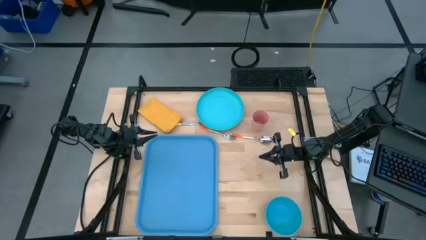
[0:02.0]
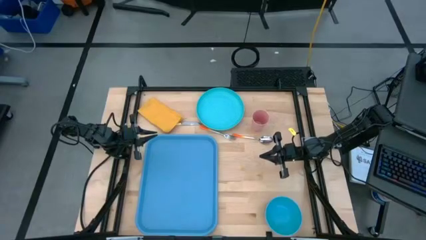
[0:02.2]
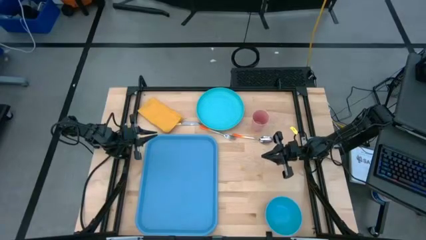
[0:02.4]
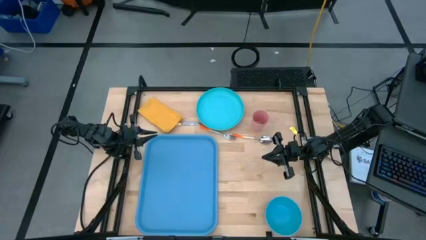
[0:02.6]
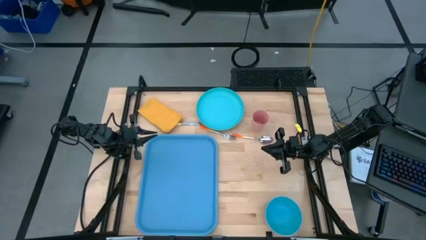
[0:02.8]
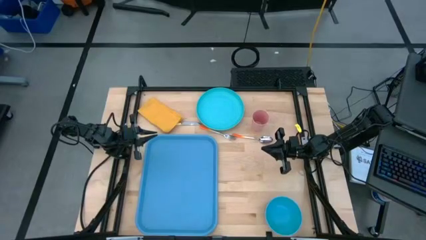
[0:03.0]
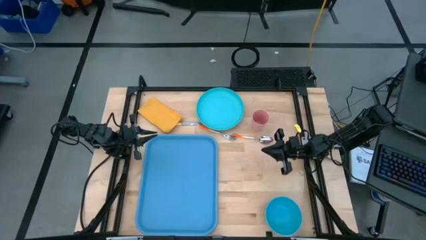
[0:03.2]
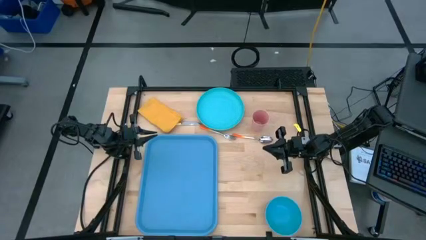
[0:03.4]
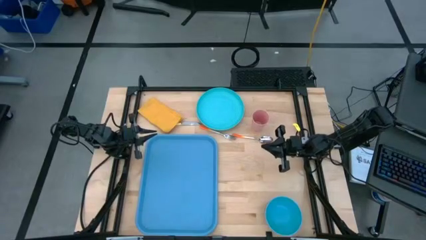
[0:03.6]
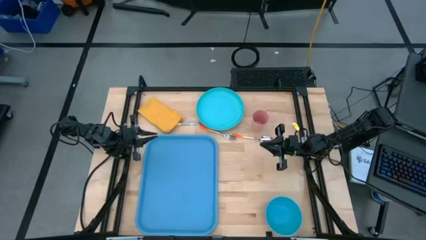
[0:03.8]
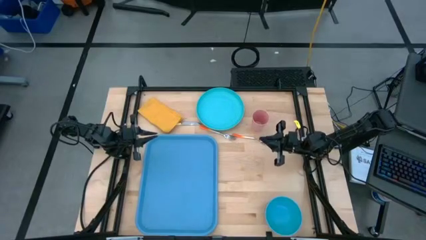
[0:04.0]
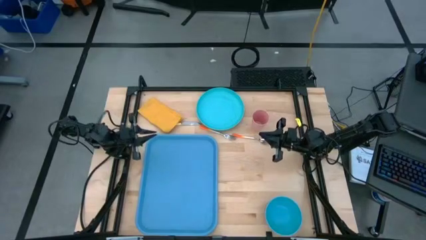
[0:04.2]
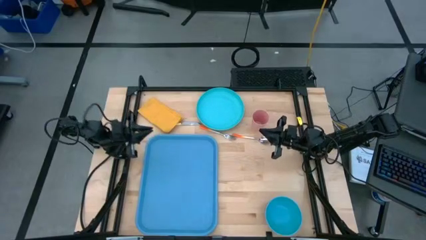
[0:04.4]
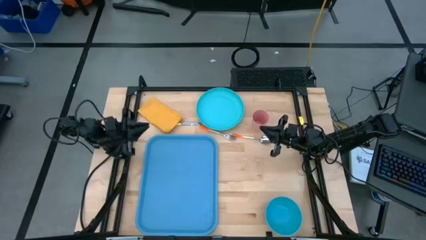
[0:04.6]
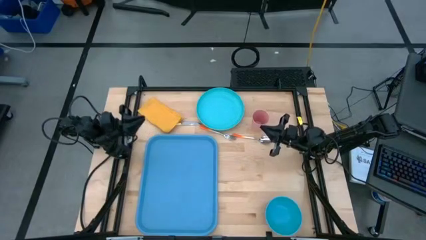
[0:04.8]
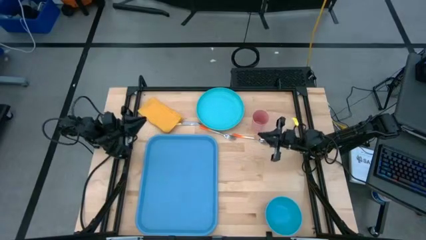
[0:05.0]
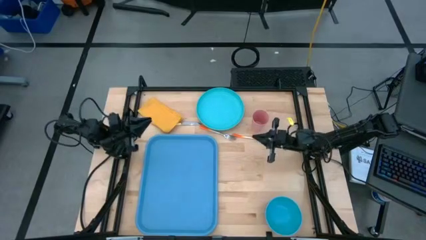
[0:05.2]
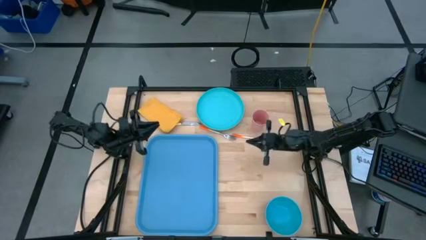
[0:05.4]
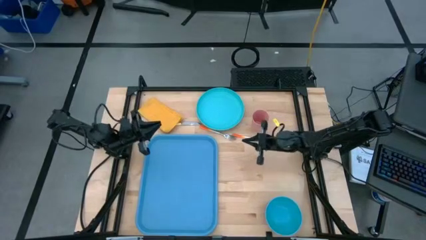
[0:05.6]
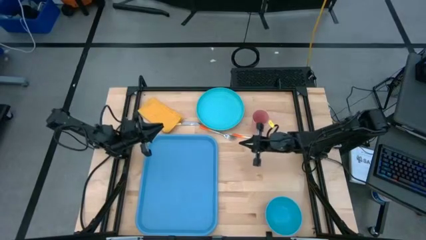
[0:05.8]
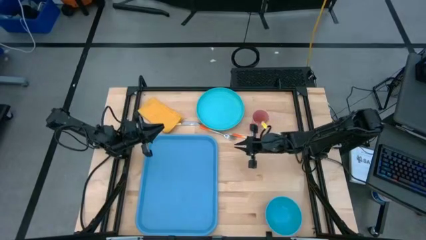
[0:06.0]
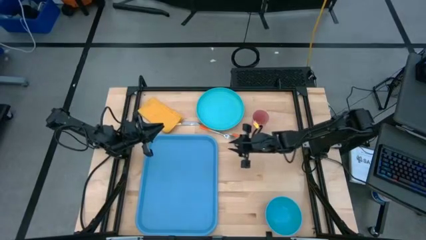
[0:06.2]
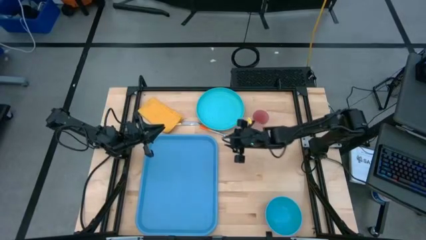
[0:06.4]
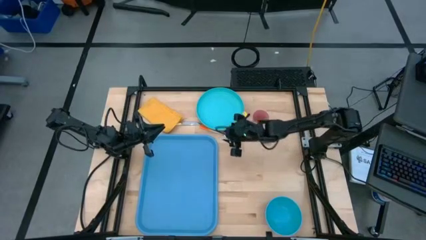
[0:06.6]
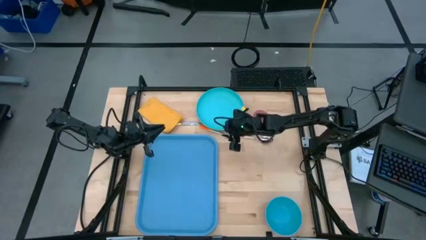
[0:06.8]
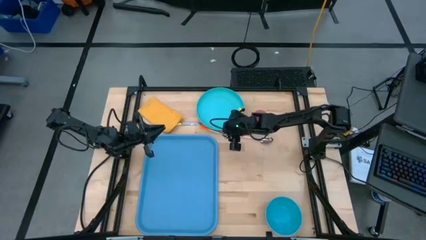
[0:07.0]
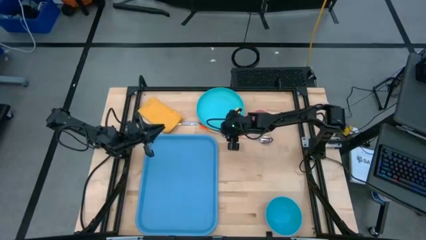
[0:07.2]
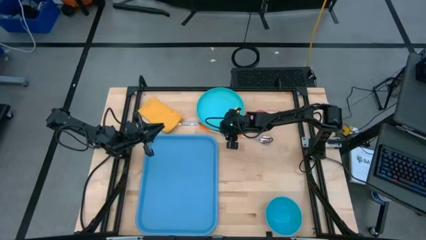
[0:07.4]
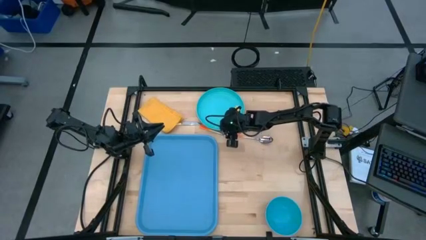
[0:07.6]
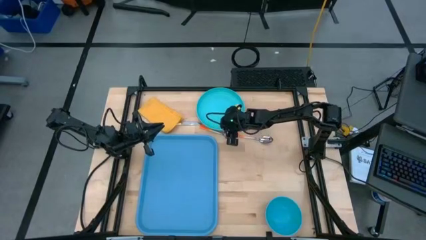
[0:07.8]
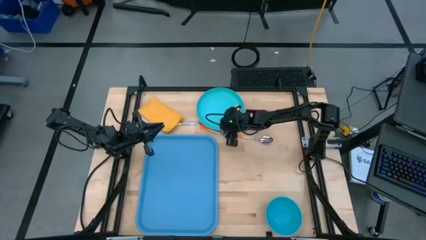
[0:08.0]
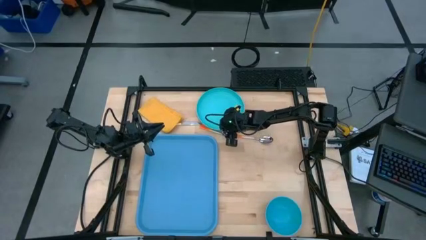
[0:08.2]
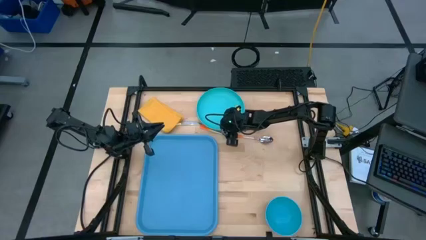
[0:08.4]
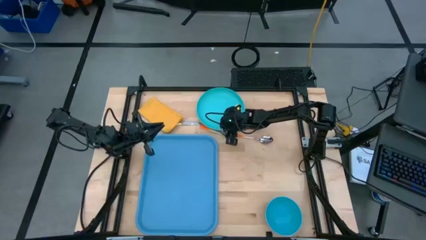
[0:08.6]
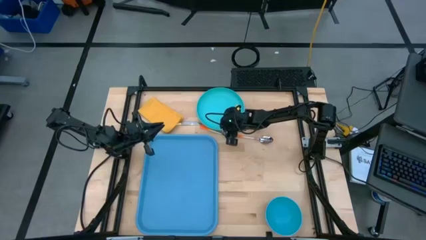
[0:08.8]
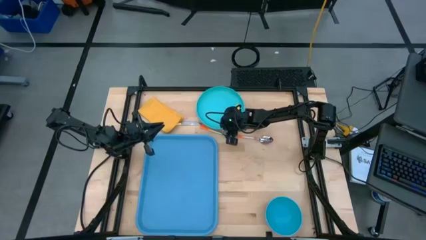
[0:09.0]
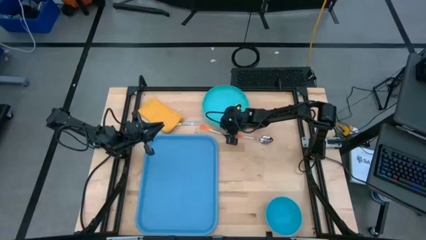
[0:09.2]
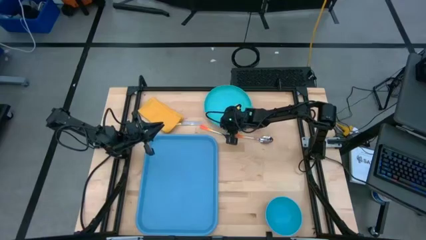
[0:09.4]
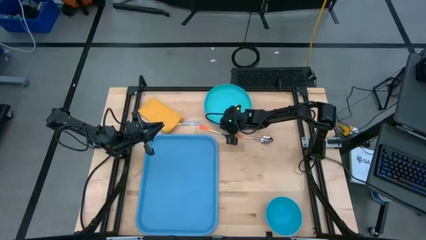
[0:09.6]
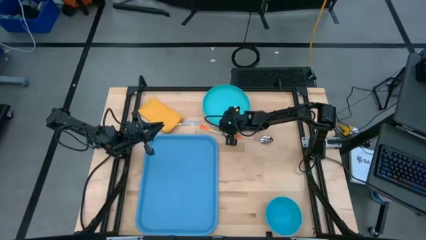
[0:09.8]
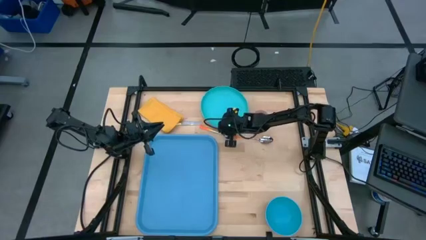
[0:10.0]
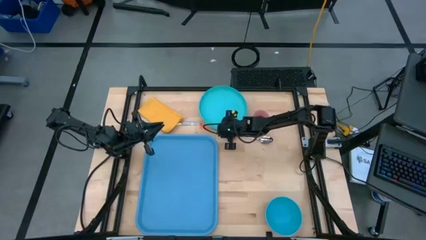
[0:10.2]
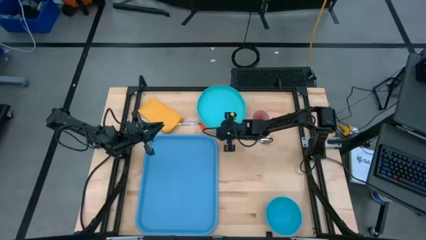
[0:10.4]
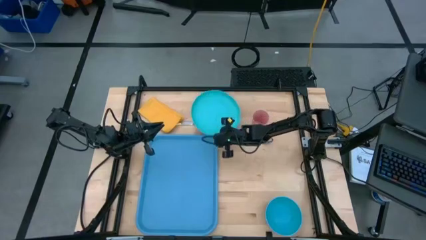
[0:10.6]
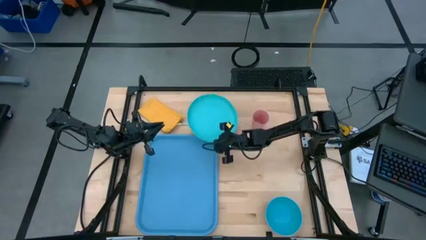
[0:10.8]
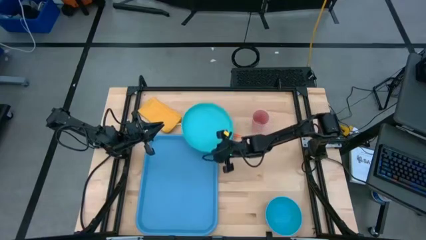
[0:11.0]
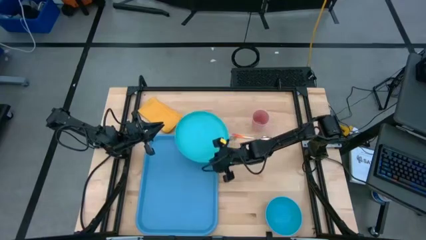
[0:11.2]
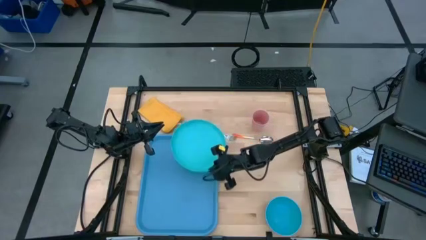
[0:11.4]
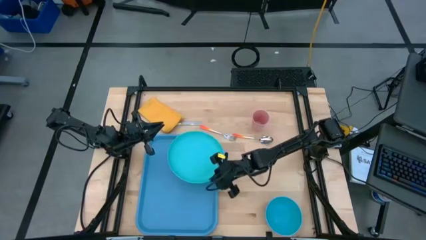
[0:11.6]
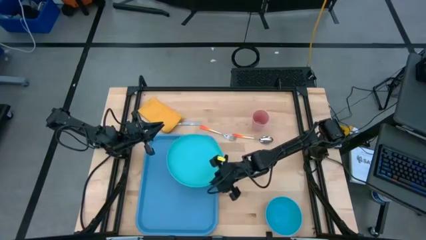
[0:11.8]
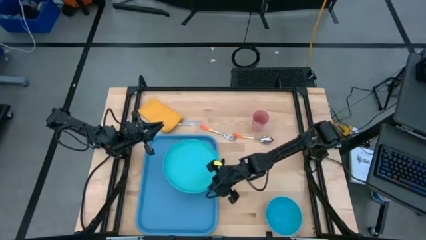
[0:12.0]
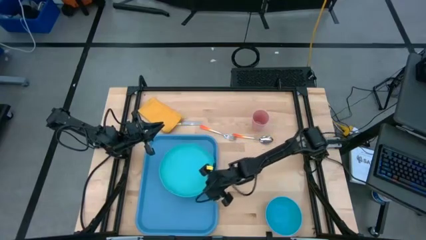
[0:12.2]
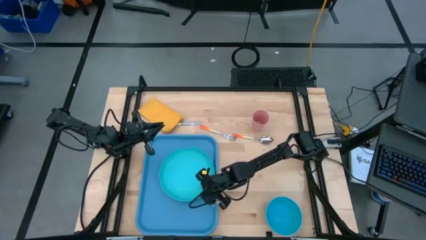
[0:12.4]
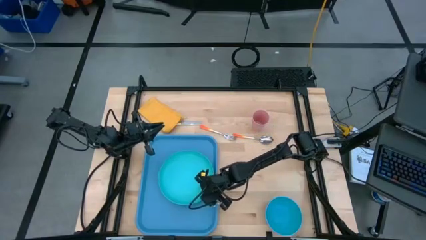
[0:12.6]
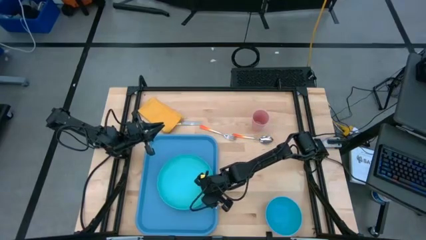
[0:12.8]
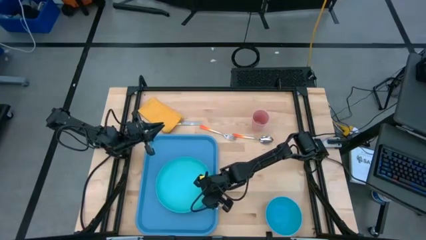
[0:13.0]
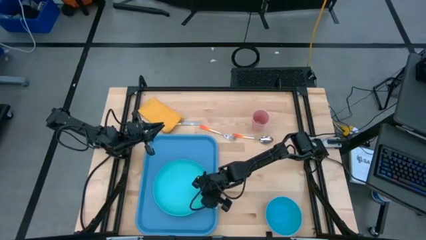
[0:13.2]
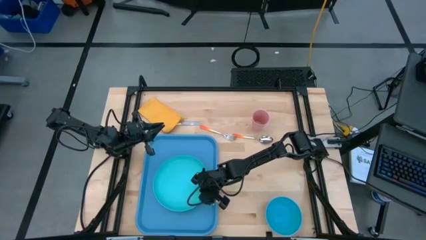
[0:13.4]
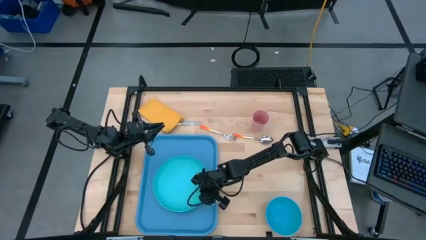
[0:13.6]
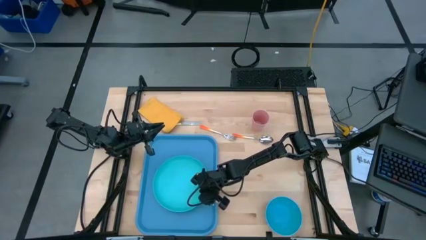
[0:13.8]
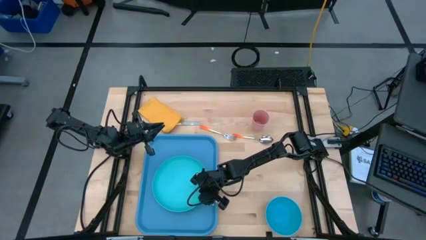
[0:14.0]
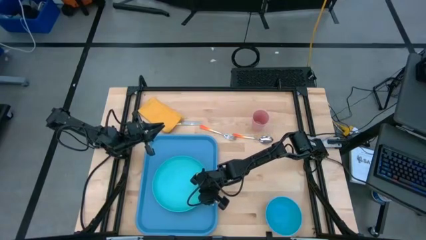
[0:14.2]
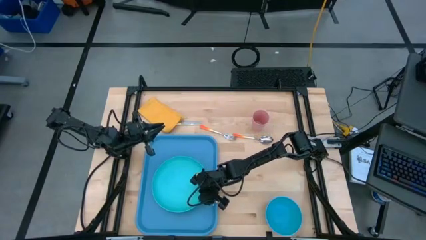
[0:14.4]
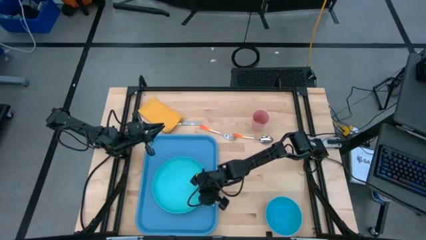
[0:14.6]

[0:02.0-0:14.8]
Task: Set up tray
Put the green plate on top of the blue serving tray
